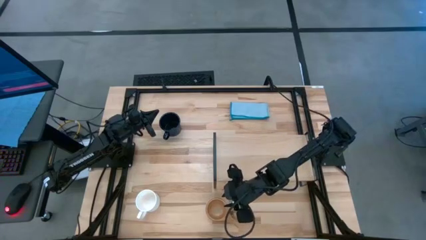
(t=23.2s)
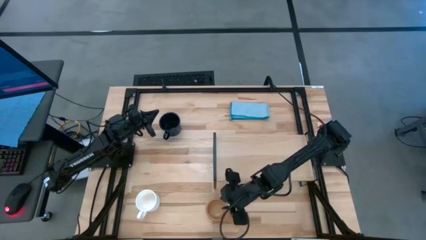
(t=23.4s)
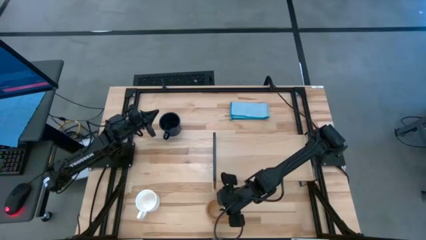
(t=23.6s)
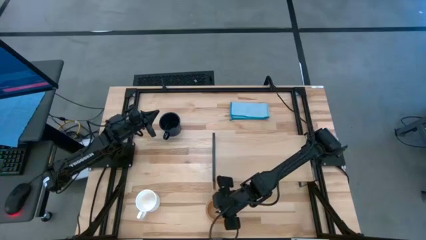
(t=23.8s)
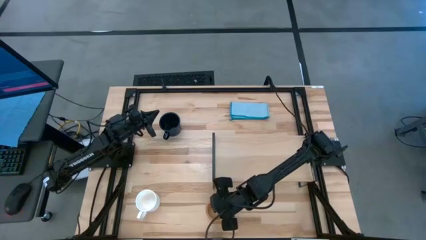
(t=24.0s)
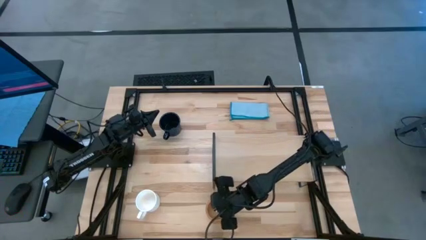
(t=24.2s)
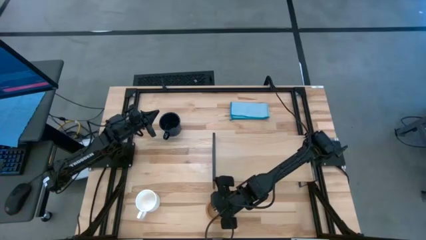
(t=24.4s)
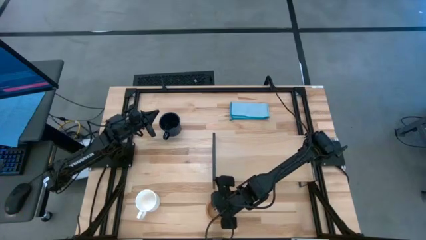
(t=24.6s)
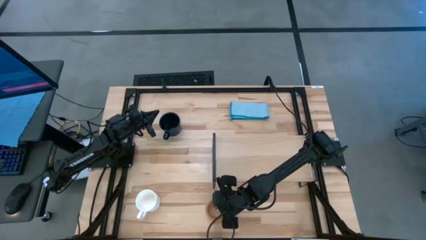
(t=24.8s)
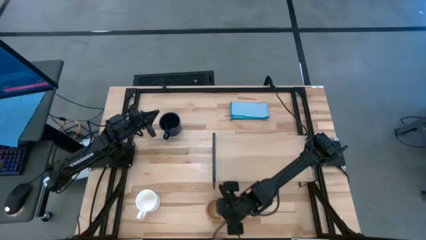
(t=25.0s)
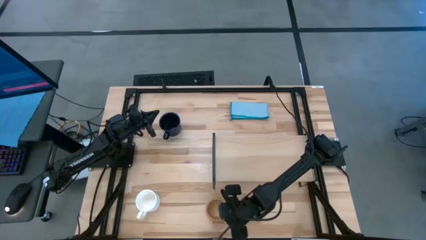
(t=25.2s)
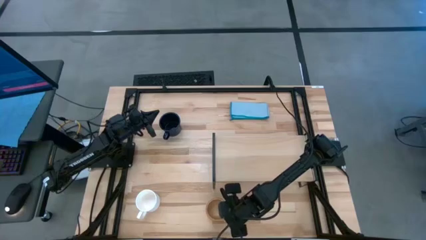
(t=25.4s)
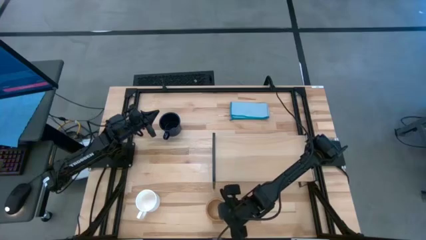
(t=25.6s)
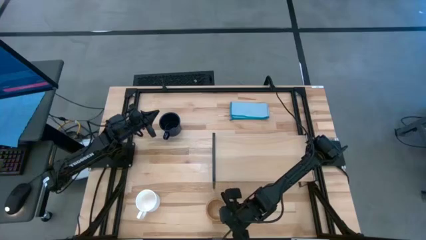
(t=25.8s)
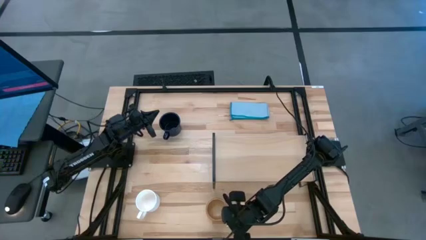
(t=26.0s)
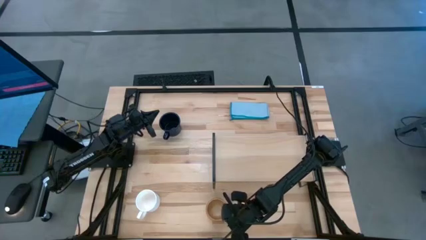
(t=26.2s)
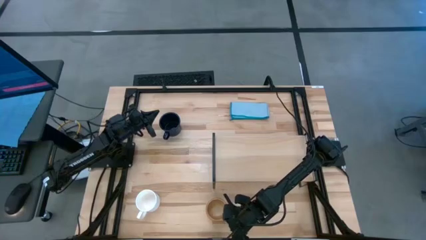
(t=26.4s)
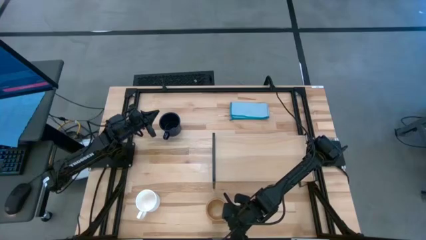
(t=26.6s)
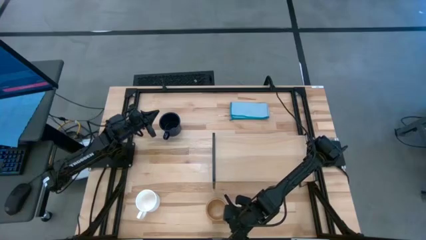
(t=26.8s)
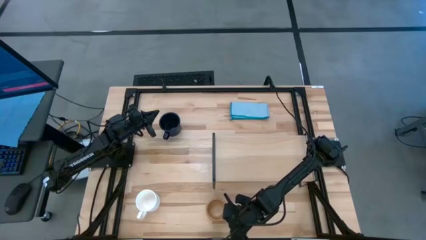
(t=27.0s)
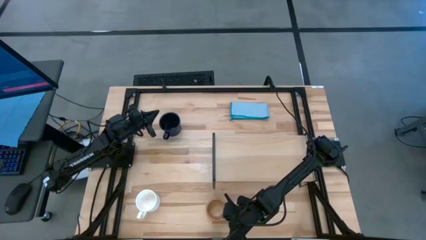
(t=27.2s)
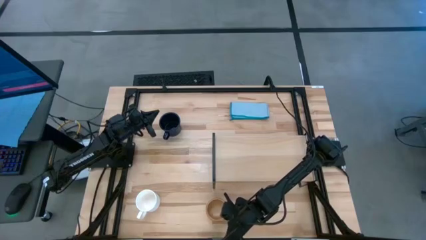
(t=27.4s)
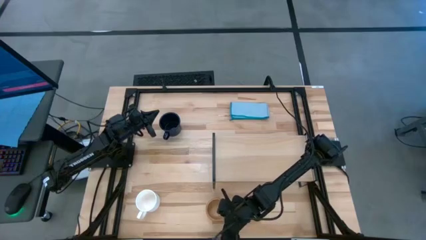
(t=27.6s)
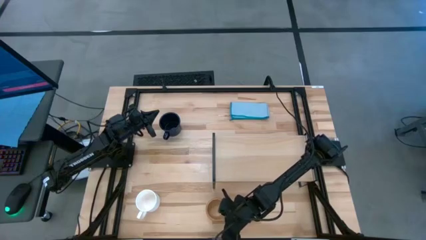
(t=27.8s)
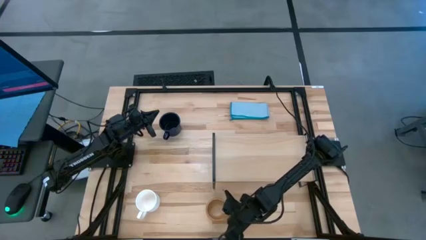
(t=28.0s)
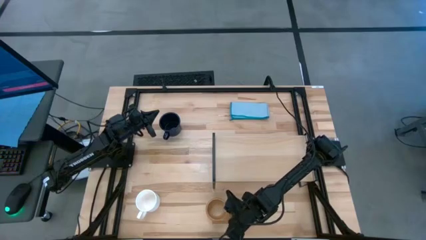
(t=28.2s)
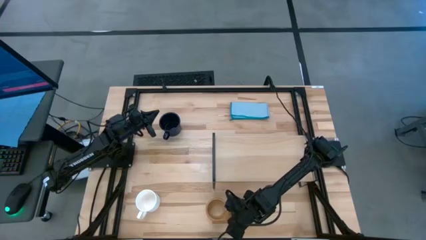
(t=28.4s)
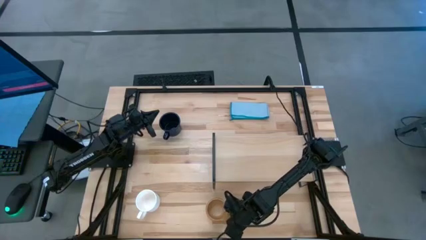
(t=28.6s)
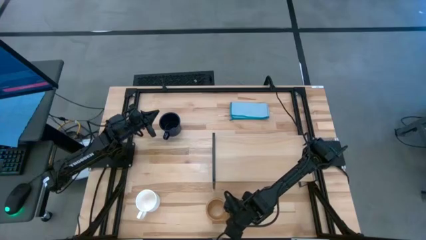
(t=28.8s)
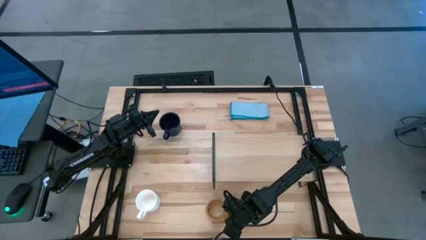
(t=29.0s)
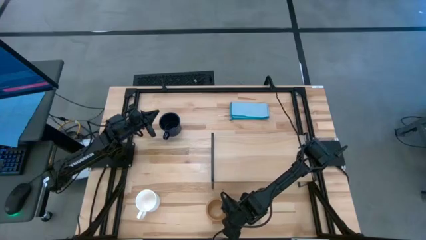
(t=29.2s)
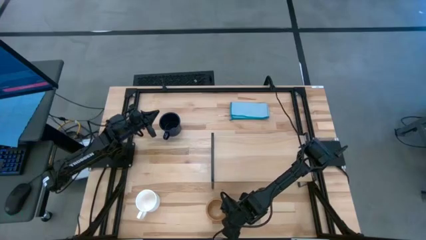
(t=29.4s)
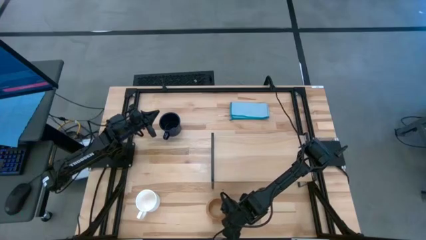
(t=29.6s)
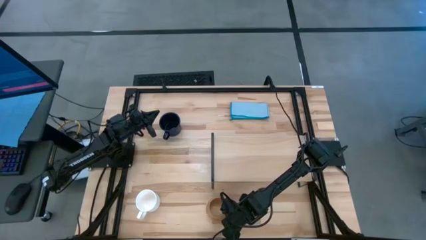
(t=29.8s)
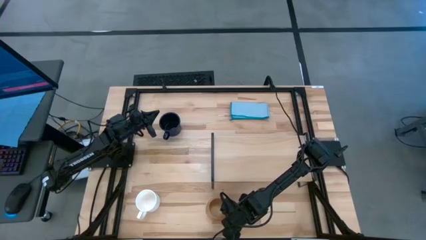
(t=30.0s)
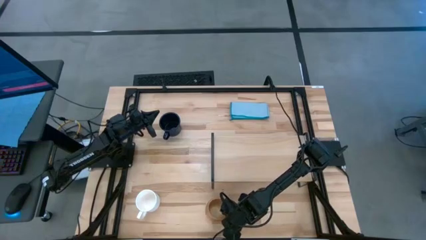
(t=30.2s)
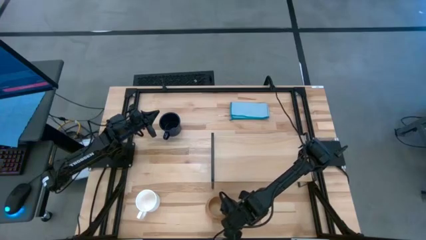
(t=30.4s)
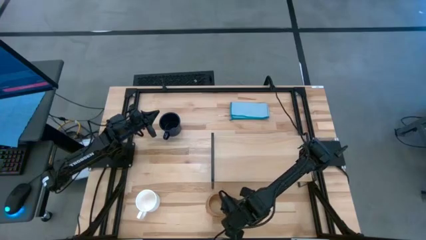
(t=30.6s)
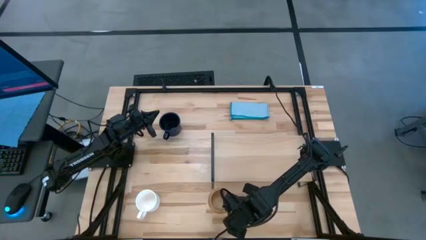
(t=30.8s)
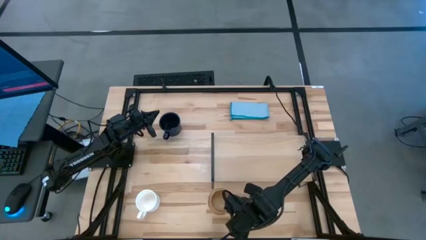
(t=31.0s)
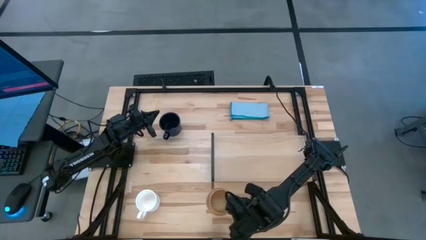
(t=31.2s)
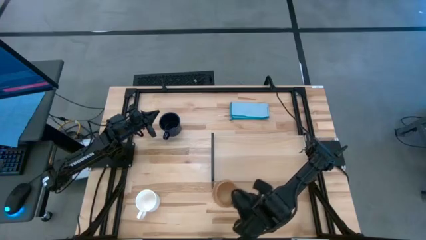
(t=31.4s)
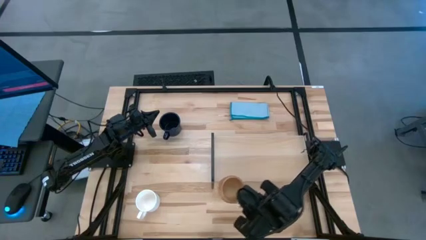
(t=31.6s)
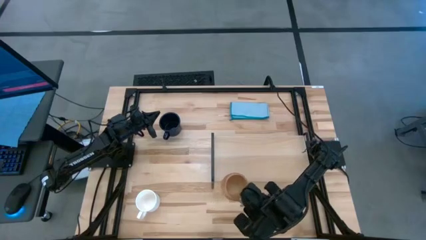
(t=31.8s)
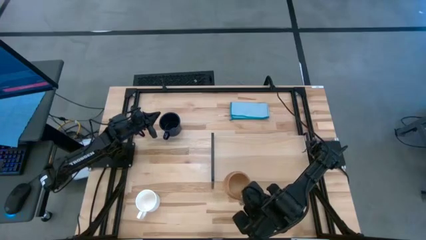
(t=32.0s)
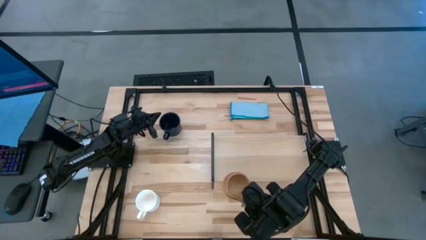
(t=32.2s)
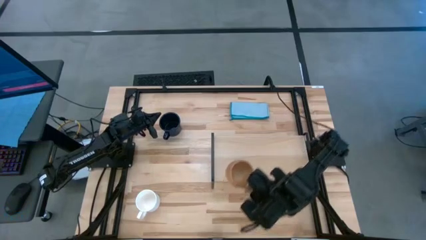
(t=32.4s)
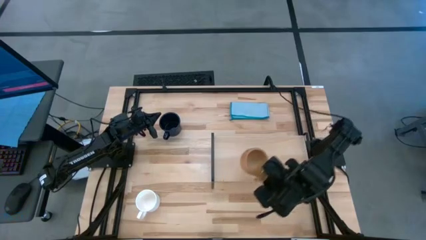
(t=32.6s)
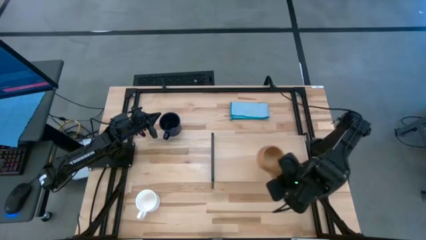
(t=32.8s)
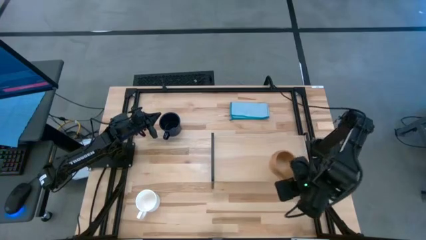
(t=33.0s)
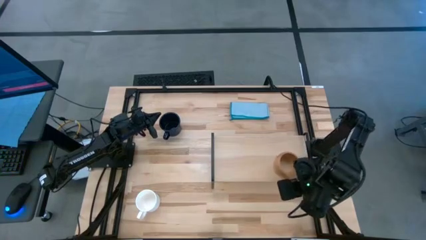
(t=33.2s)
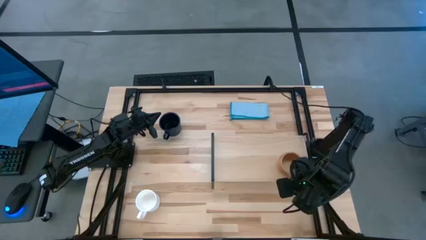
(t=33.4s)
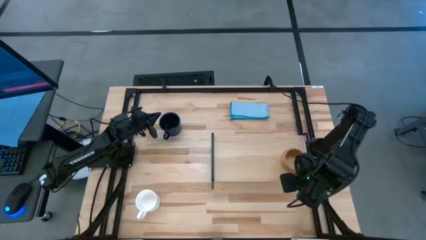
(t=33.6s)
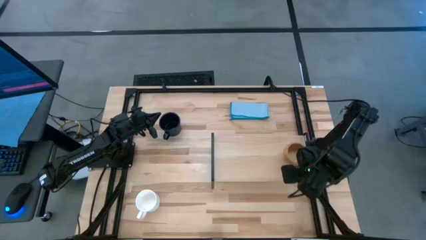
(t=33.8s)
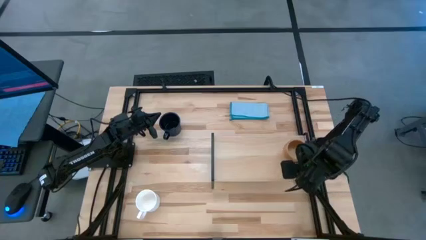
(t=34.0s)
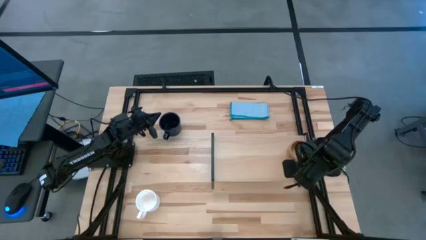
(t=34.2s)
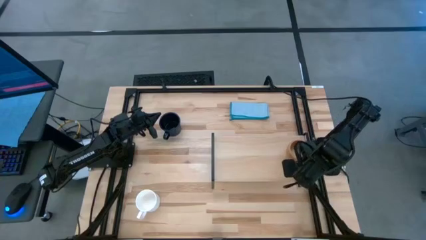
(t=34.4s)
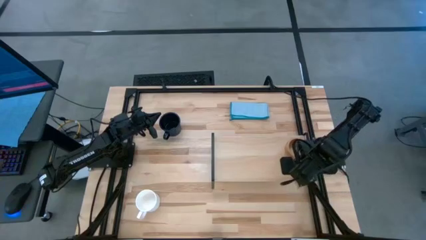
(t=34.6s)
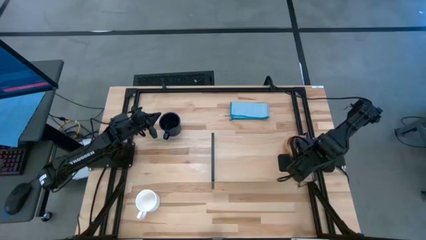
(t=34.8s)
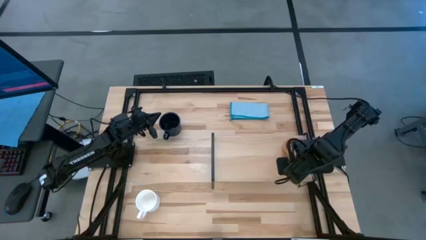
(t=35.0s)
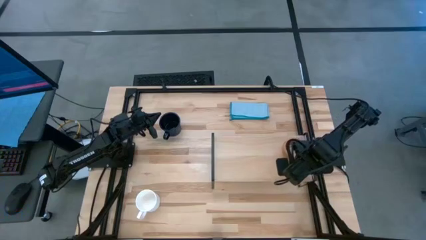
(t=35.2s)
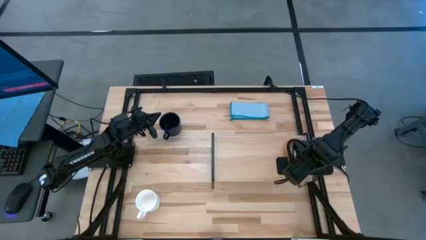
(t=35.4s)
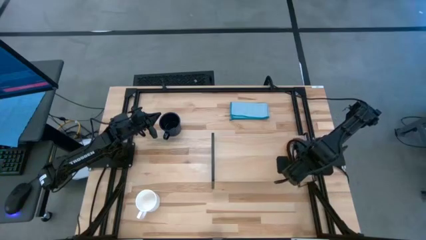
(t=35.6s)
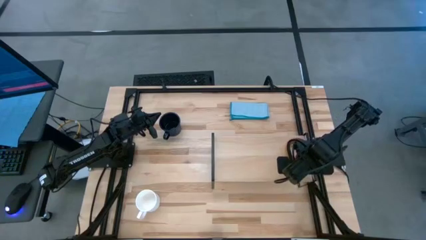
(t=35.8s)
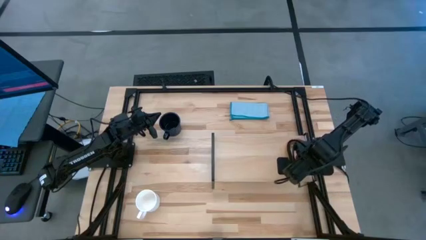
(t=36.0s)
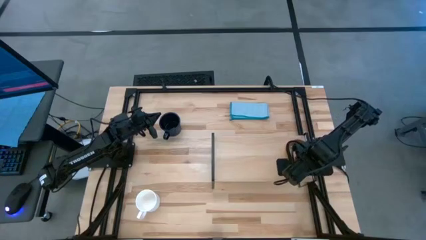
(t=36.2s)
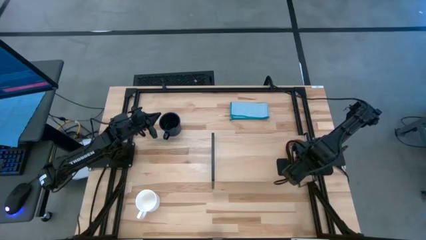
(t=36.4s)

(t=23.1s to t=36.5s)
Task: Stack small to large cups/mugs on shelf
Put the brown mug on the shelf
